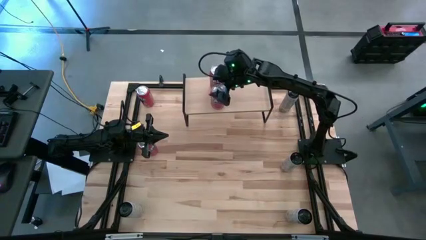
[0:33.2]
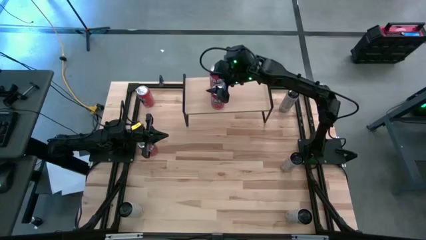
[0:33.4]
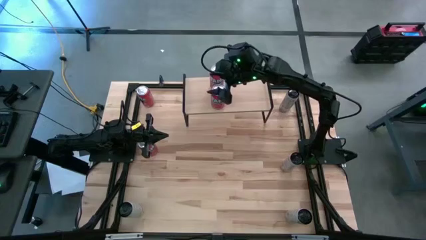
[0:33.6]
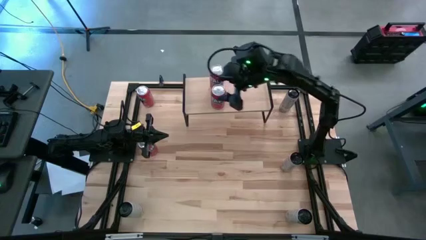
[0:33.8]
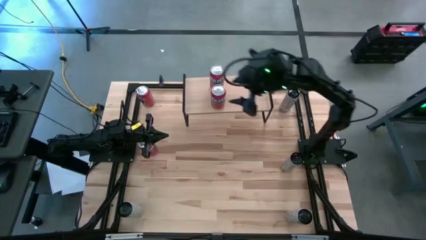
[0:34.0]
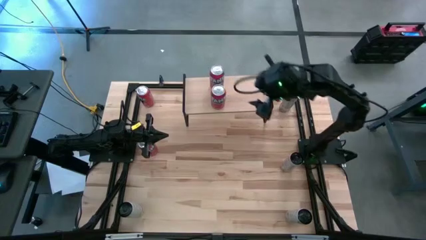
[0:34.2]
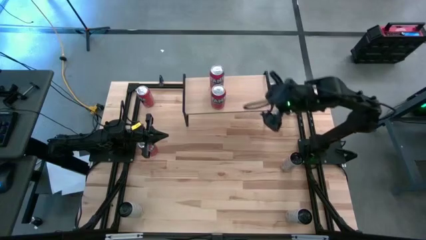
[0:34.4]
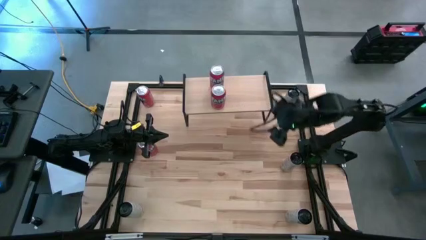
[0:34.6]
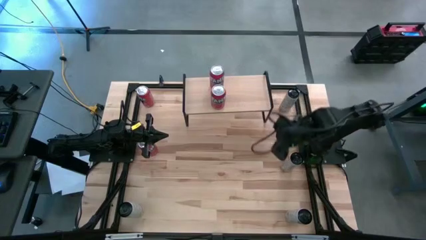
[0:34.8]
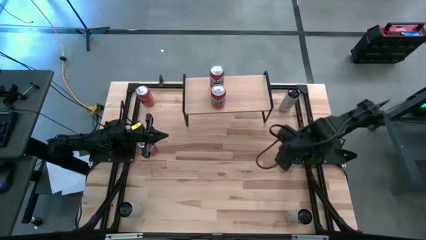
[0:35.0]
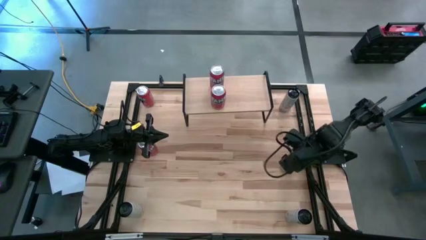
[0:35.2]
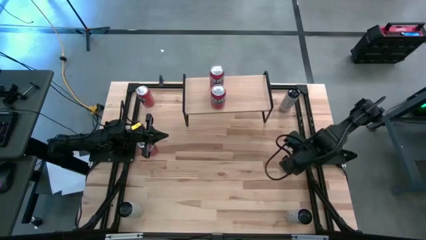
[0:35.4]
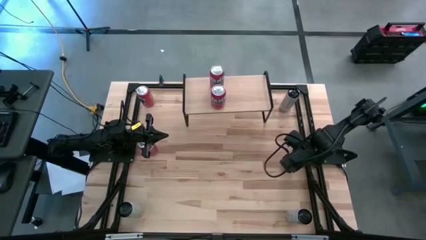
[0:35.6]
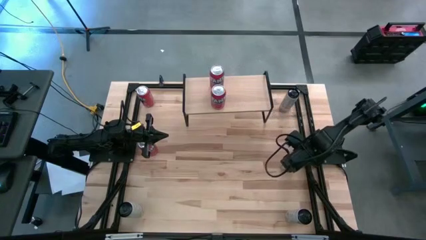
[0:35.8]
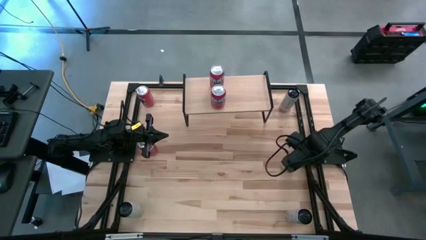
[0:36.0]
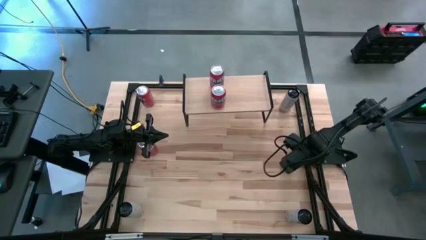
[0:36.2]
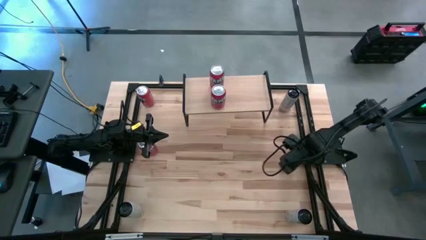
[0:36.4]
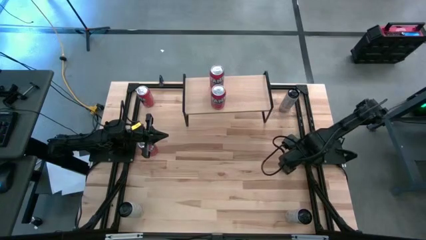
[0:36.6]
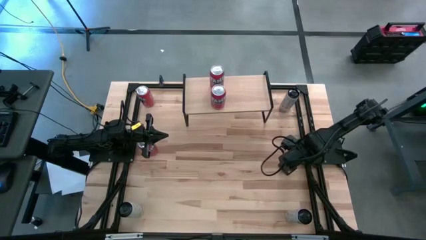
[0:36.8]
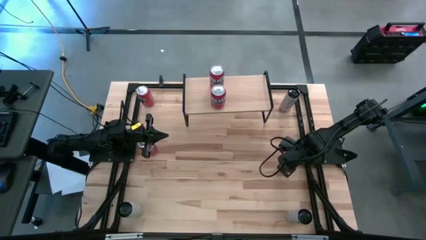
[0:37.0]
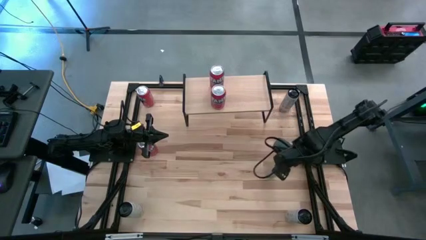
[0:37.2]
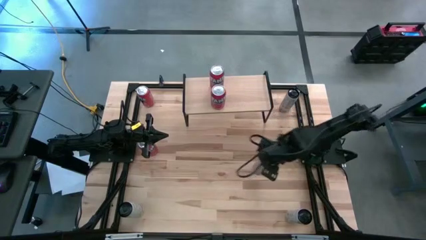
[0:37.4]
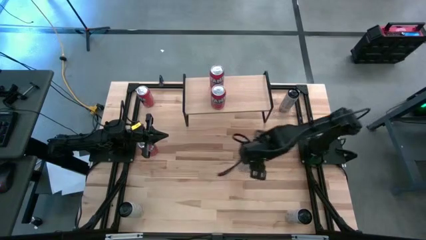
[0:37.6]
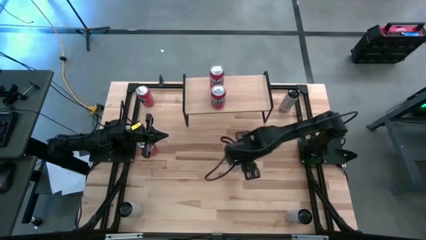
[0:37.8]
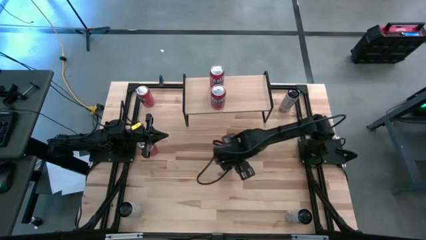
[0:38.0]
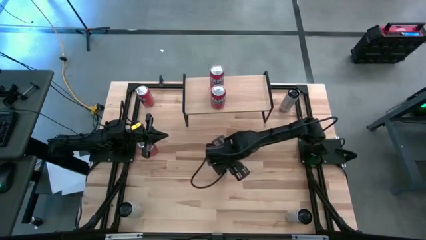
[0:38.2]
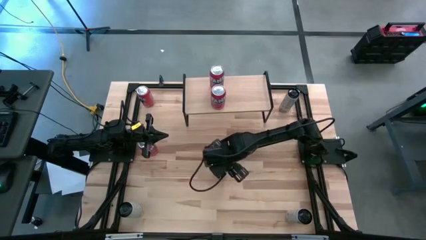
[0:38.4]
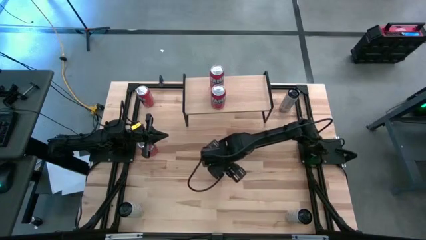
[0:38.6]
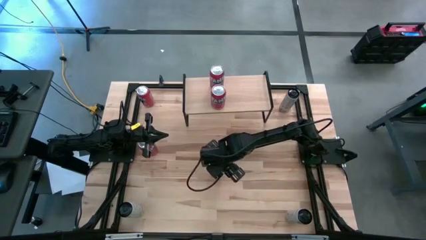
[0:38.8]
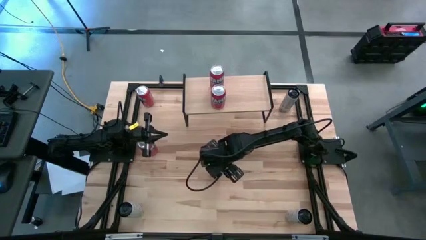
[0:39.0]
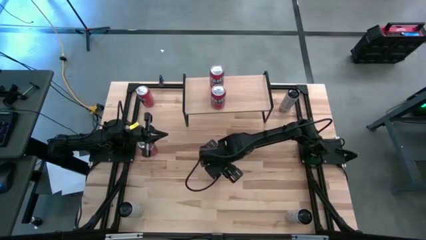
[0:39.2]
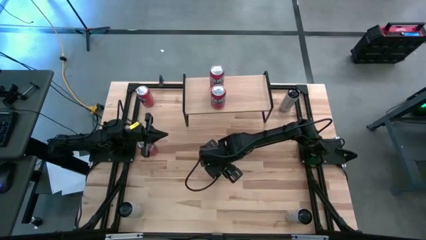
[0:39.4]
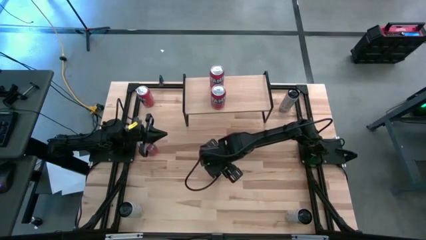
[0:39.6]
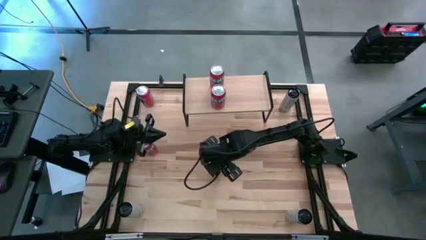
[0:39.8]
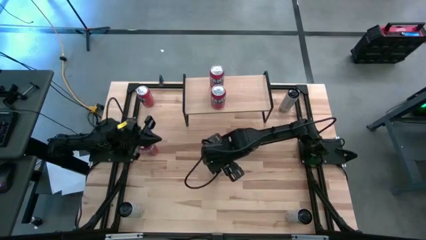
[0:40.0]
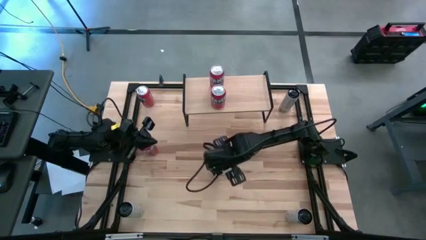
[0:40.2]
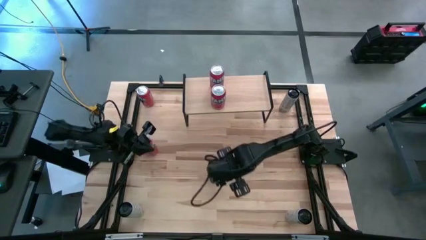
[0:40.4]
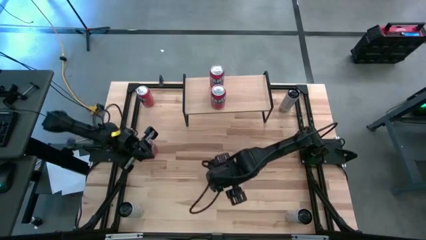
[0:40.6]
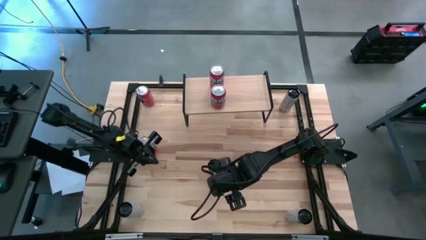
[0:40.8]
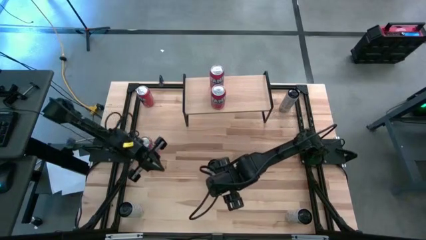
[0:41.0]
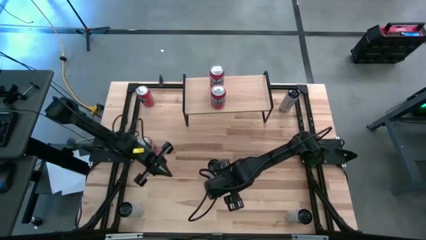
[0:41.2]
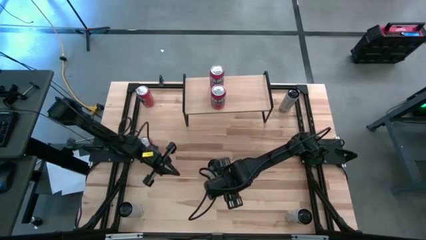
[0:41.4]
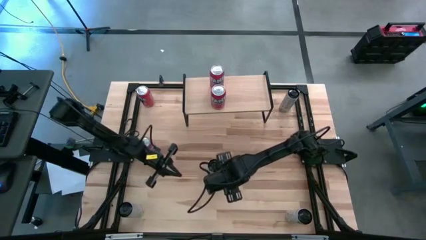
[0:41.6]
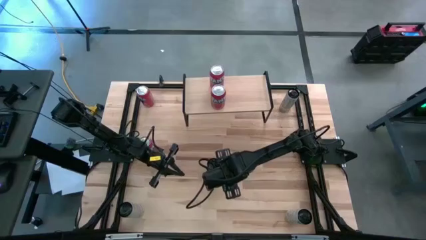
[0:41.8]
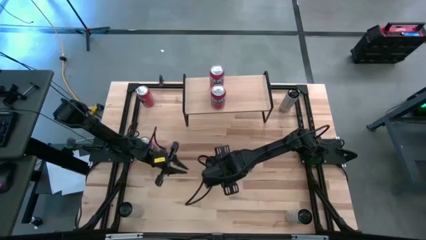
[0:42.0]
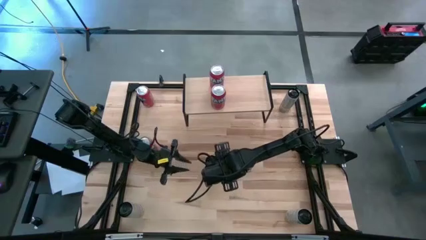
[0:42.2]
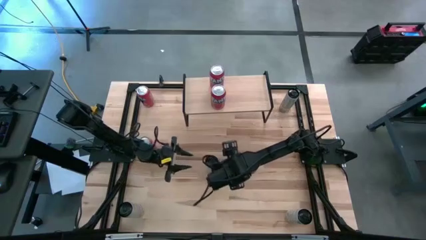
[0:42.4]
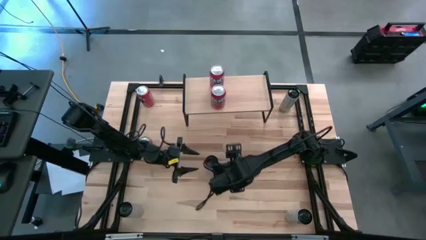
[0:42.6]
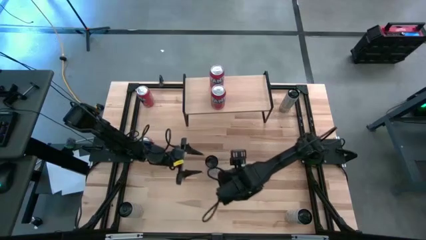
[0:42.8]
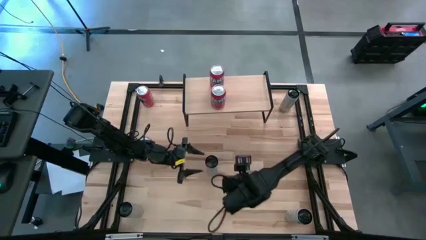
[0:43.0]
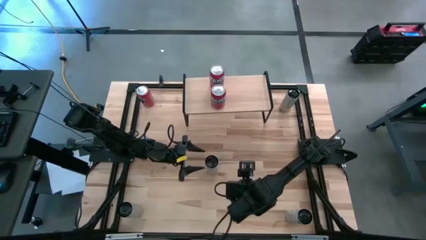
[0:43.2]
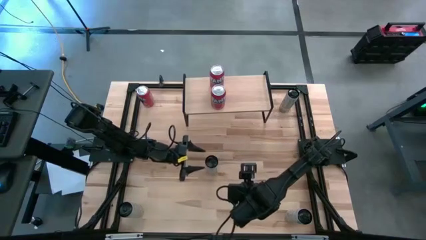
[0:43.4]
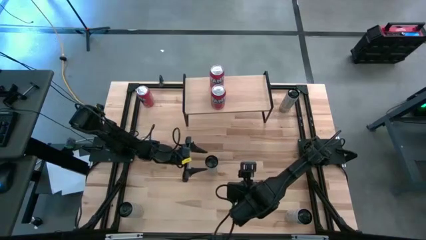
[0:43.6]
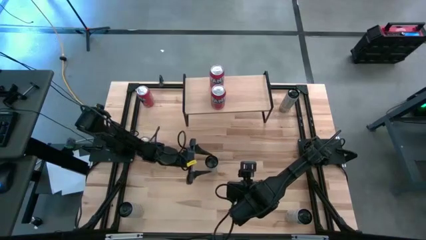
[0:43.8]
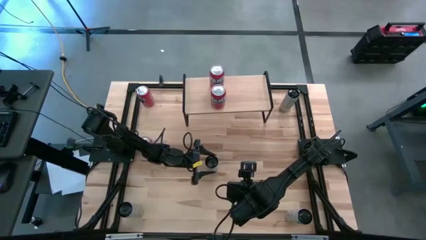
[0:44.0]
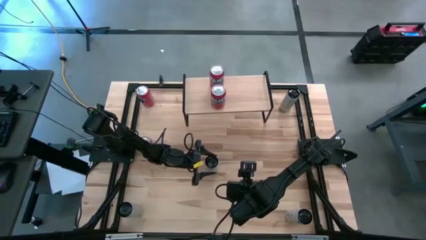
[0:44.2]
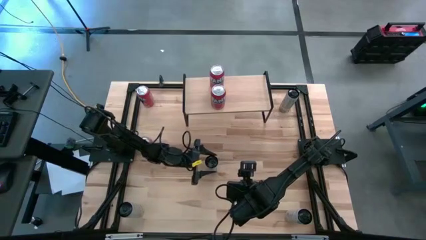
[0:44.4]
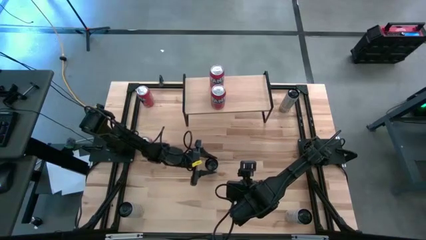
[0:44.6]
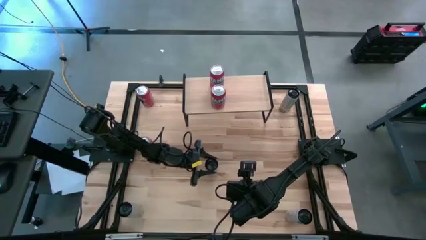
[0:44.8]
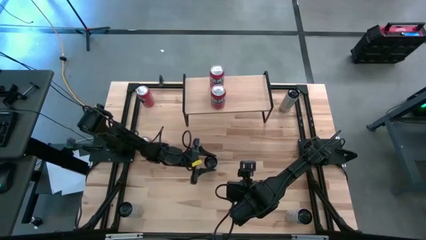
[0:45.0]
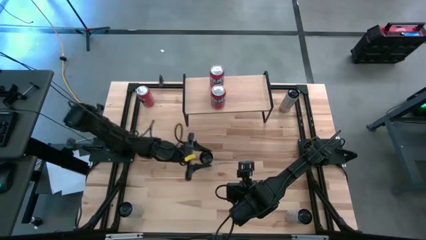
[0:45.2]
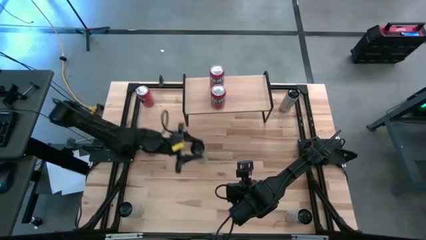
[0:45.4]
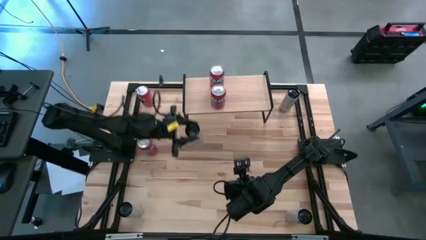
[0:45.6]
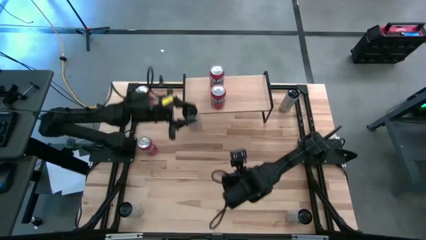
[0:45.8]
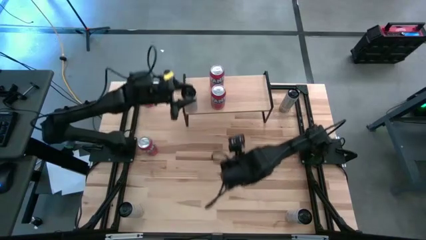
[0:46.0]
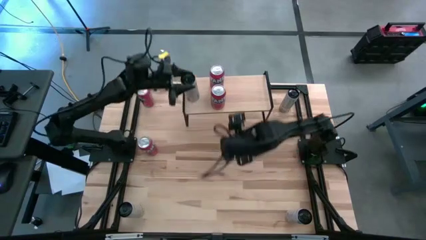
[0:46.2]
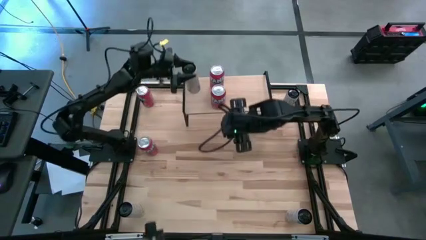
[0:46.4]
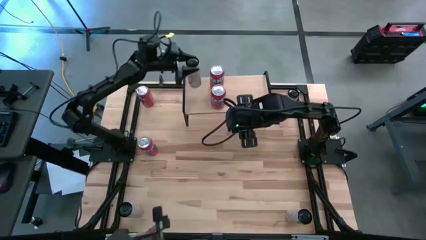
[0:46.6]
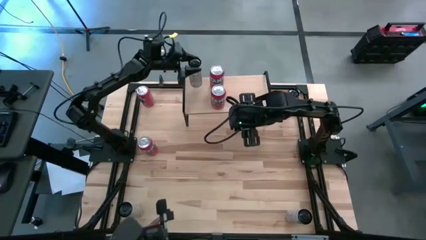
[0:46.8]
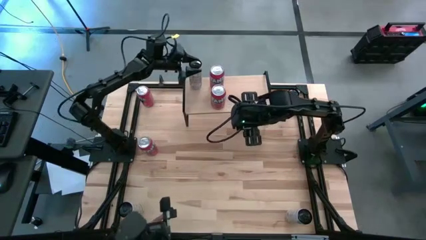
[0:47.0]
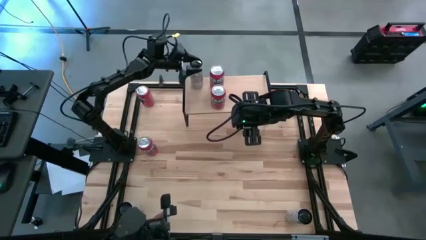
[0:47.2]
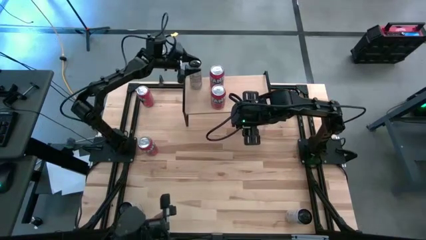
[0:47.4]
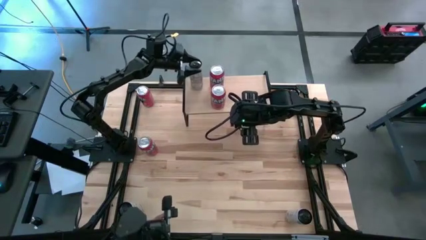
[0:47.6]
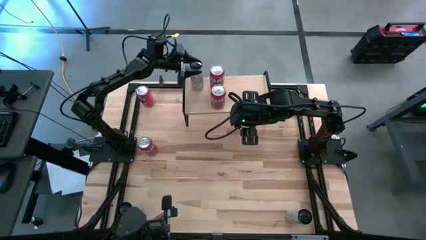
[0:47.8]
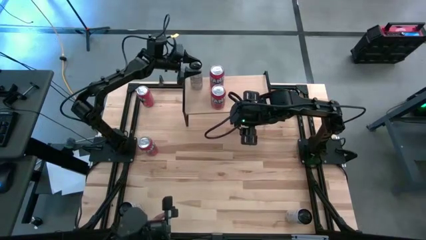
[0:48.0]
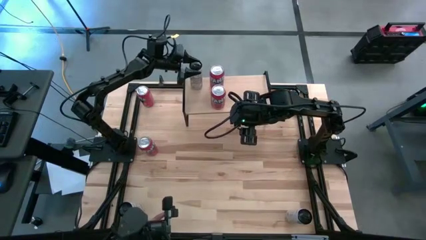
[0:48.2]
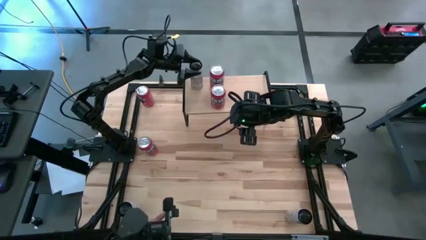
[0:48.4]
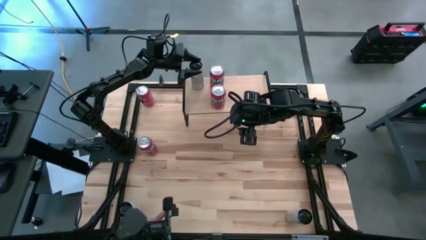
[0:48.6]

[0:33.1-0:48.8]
Task: Place canned beverage on shelf
Put the white yellow soda can on the shelf
